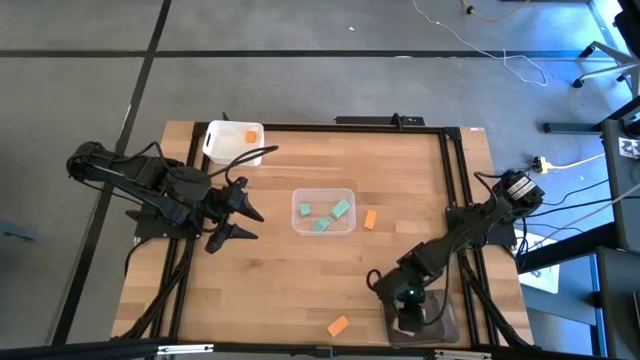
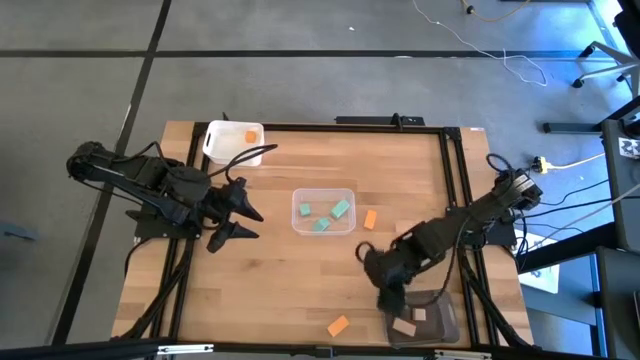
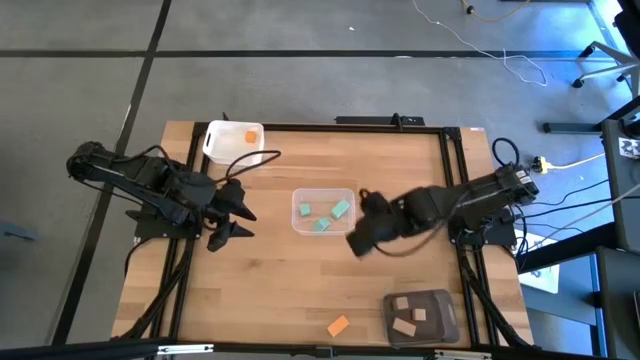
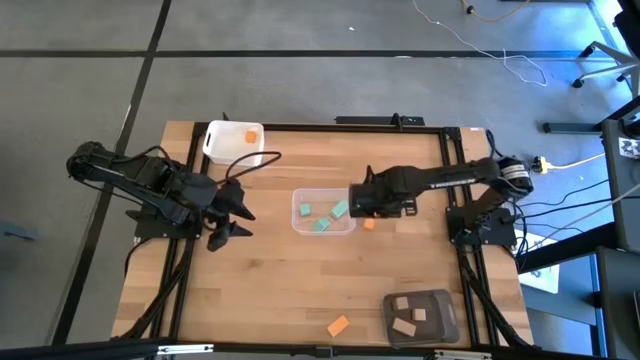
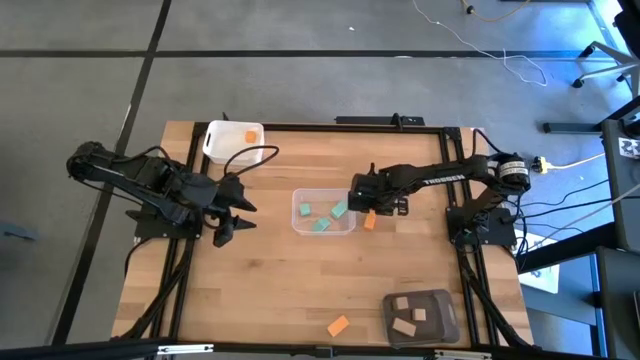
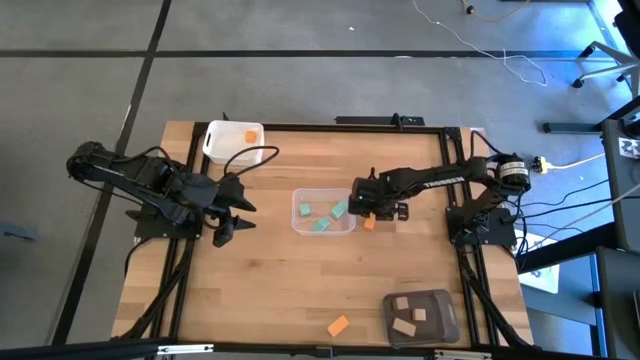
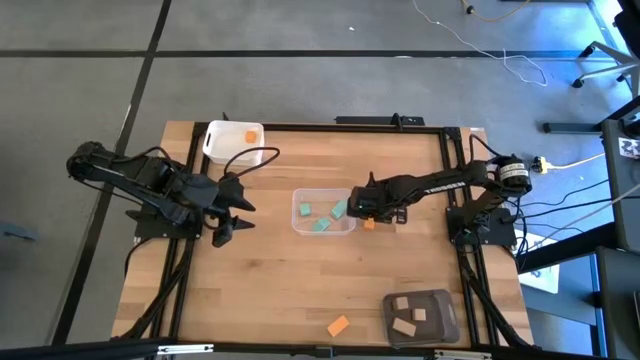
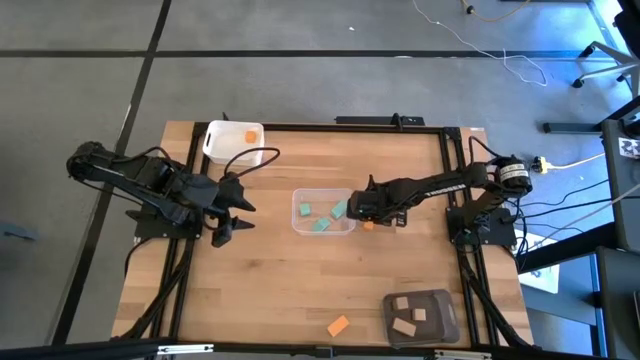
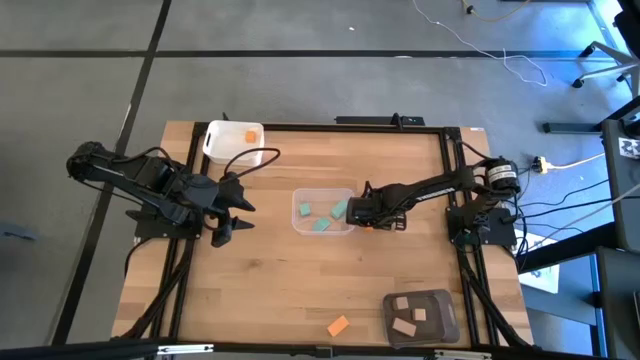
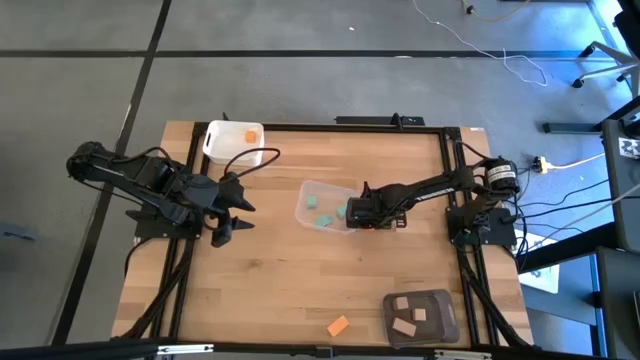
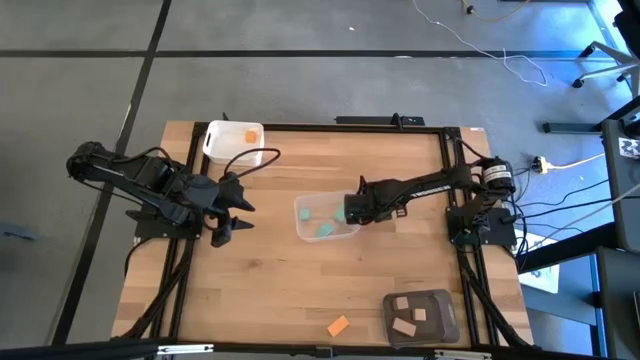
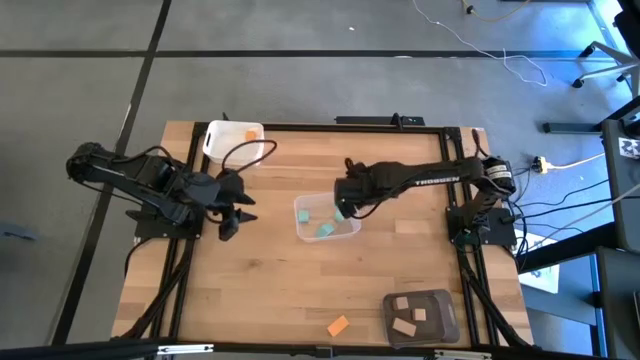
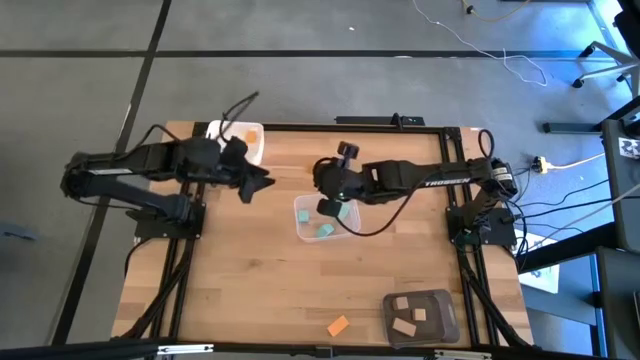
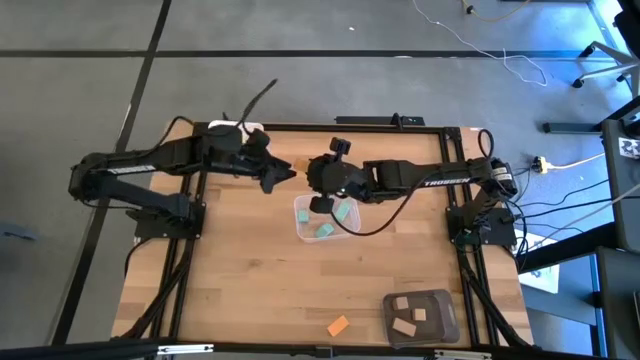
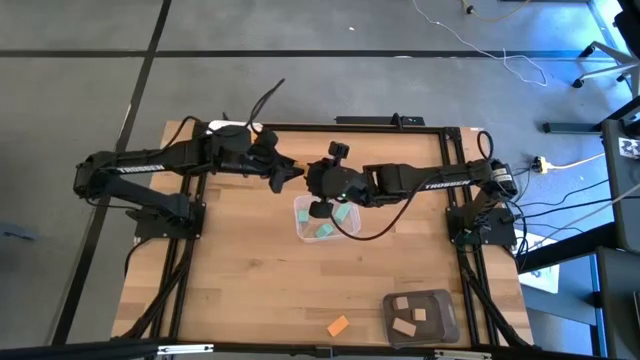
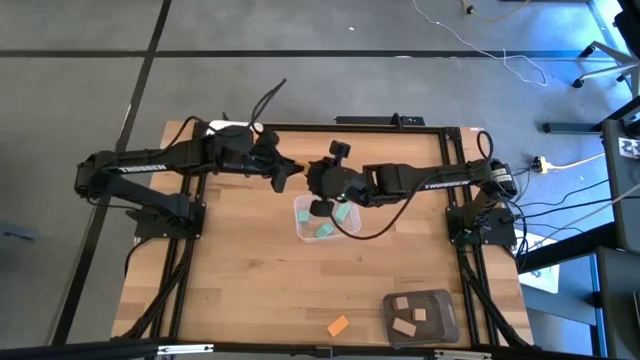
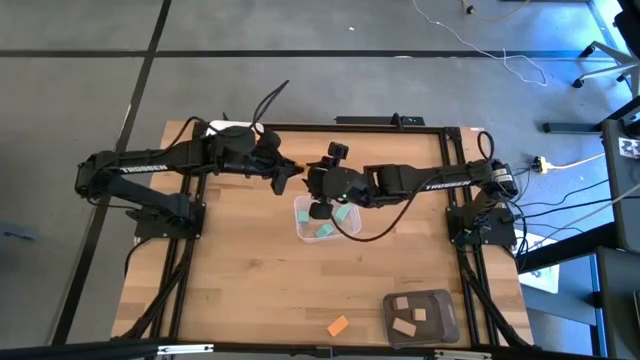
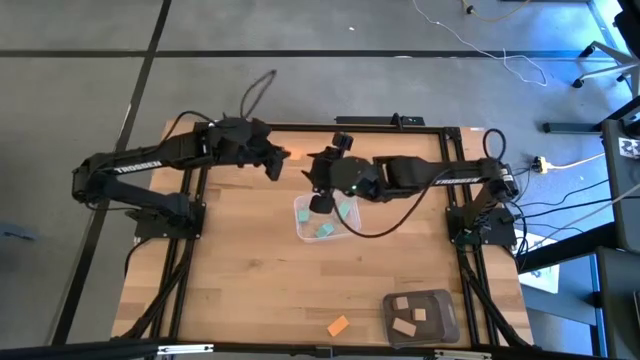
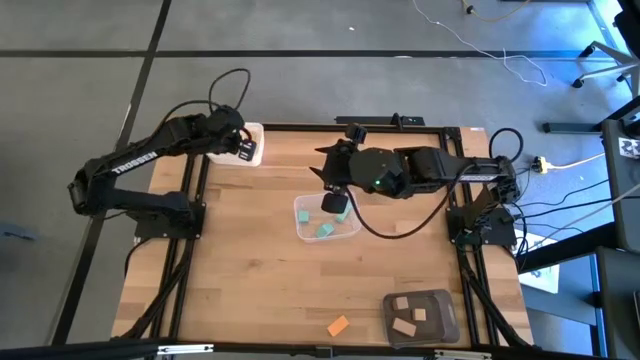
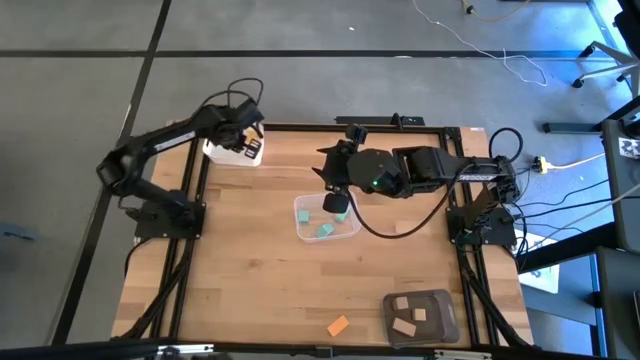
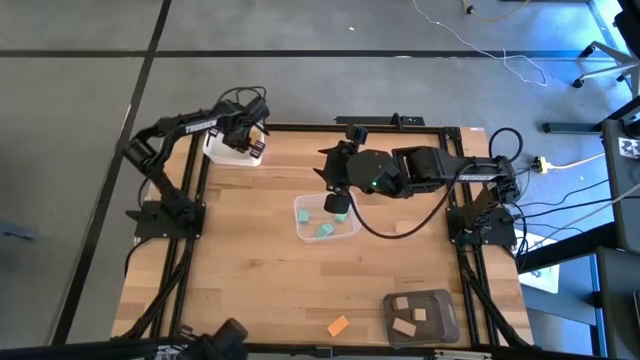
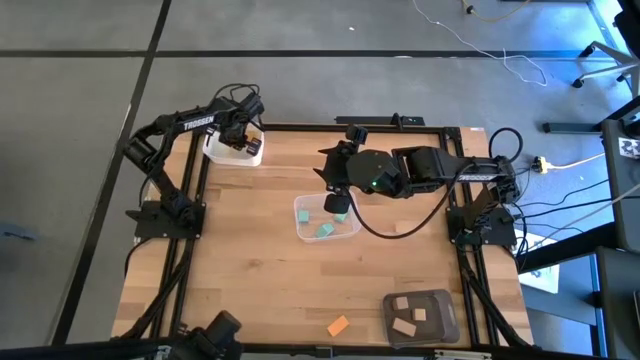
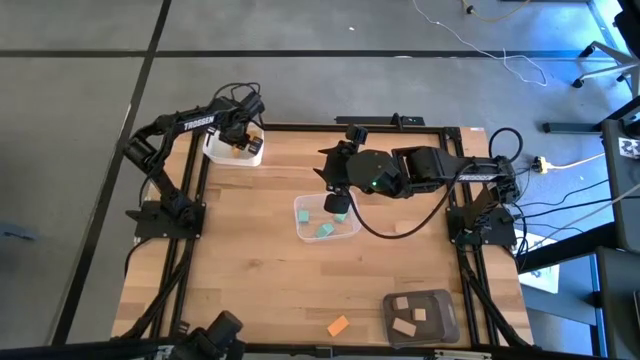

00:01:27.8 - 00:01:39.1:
Task: Sort & place blocks by color
Put the top yellow block into the white bin

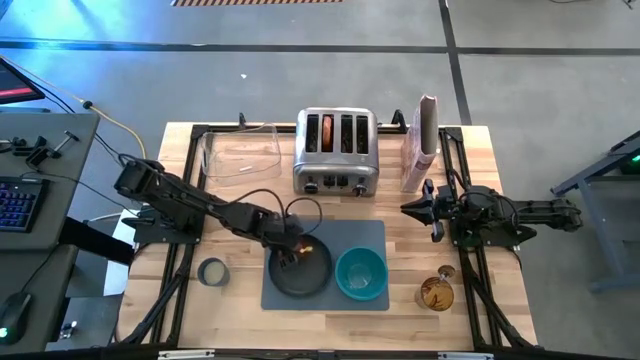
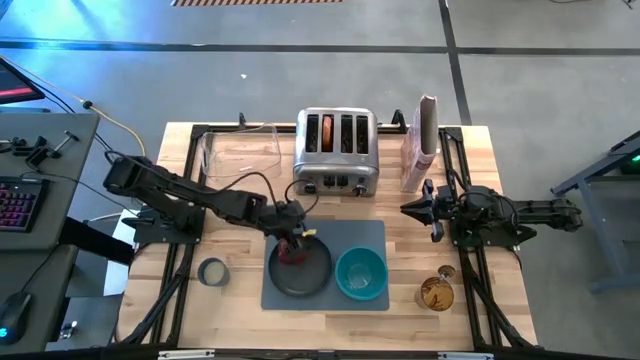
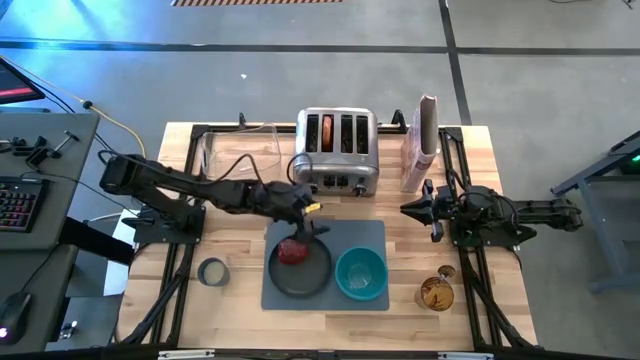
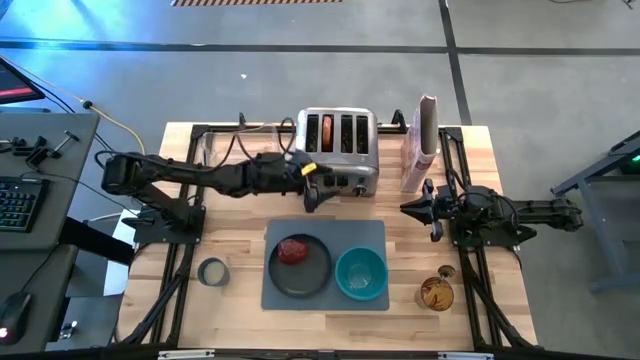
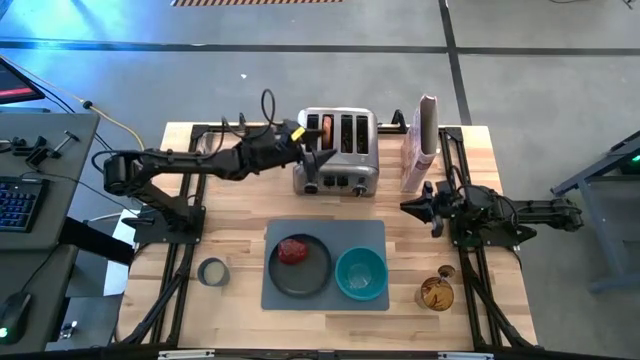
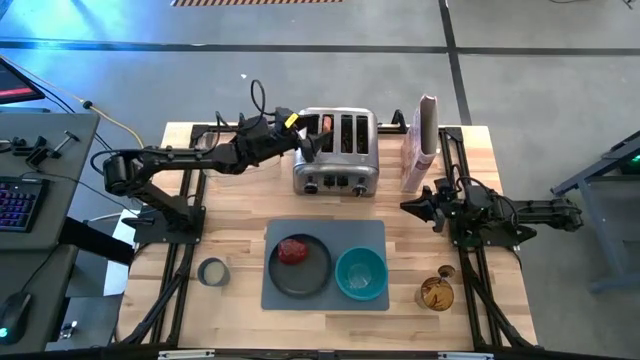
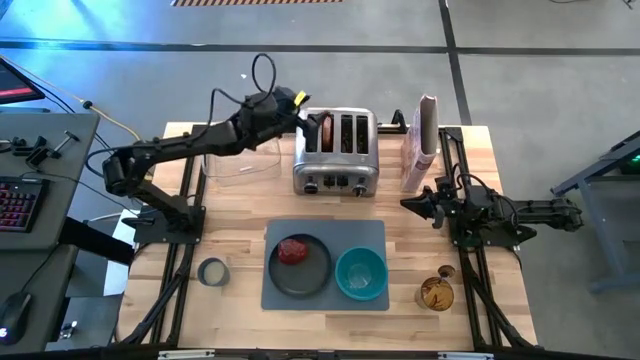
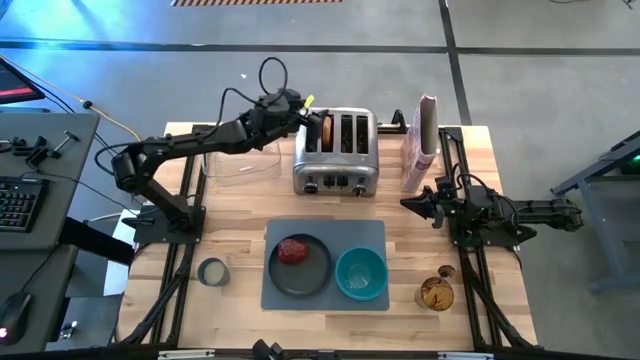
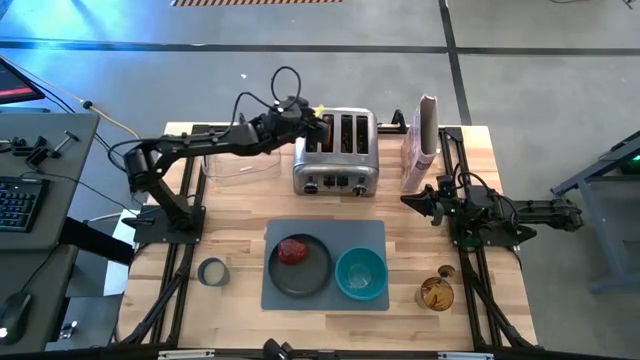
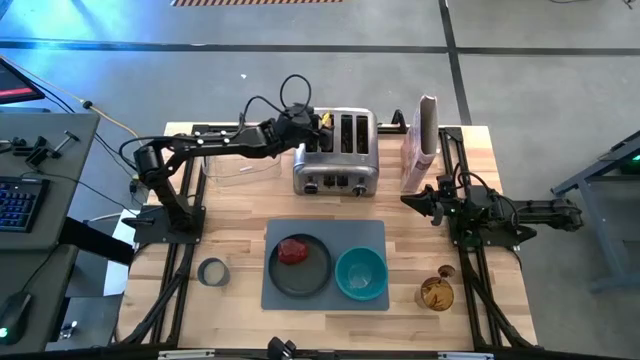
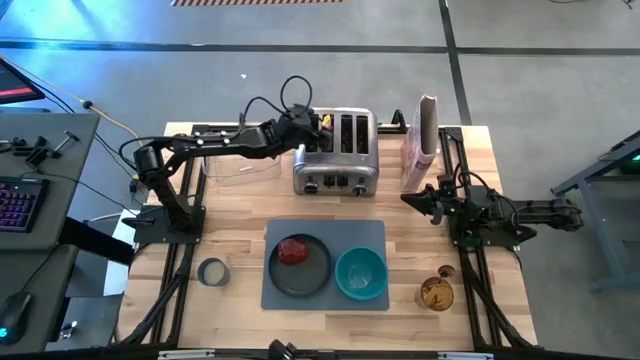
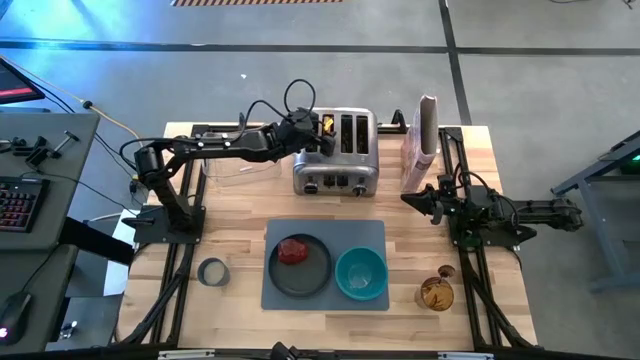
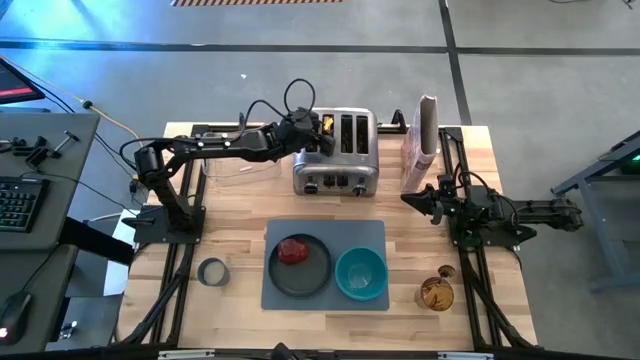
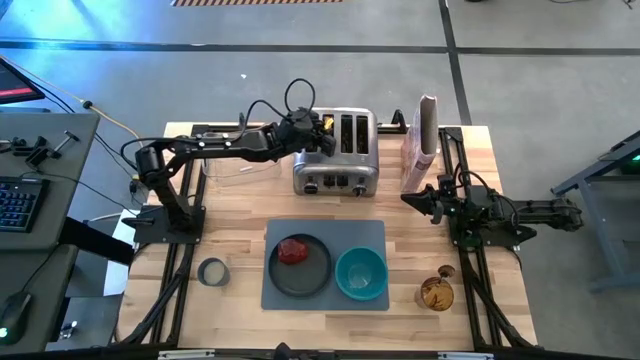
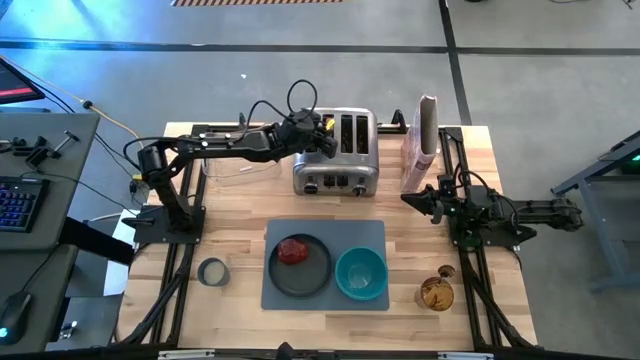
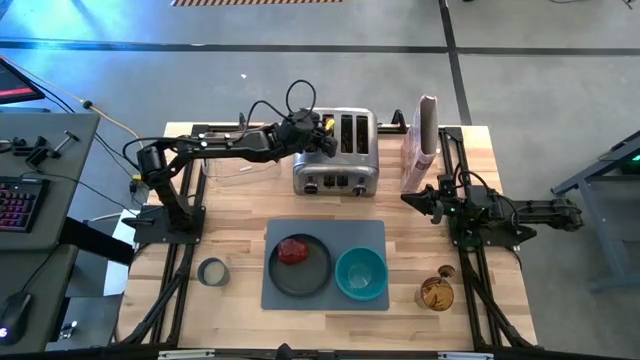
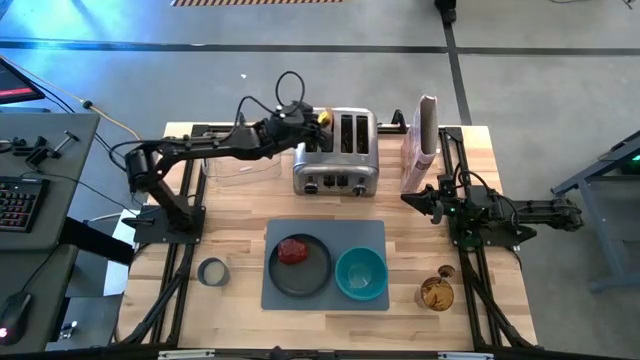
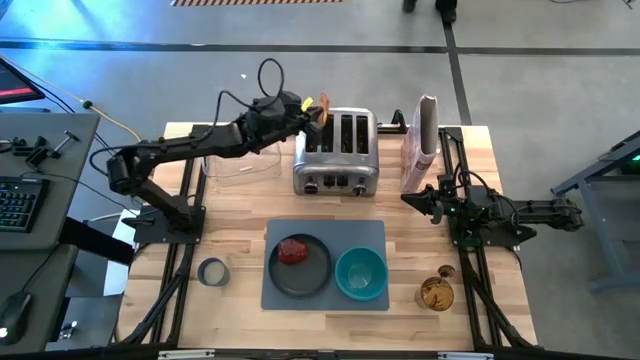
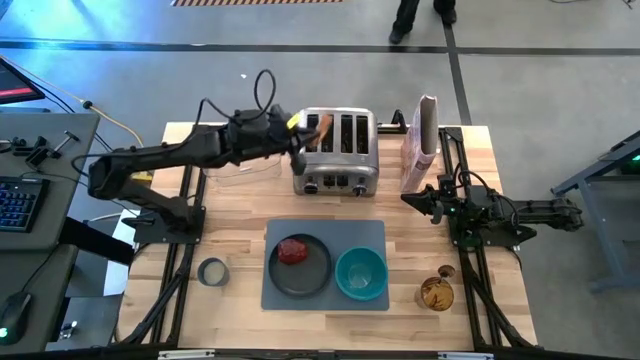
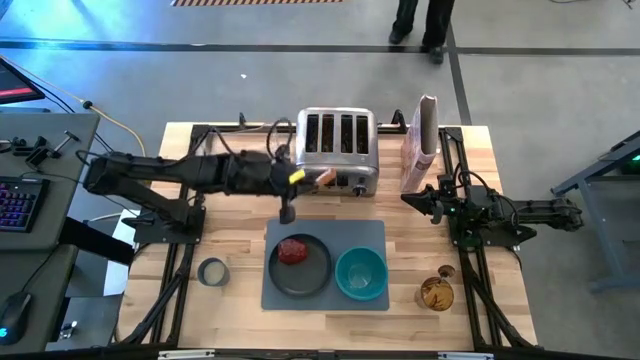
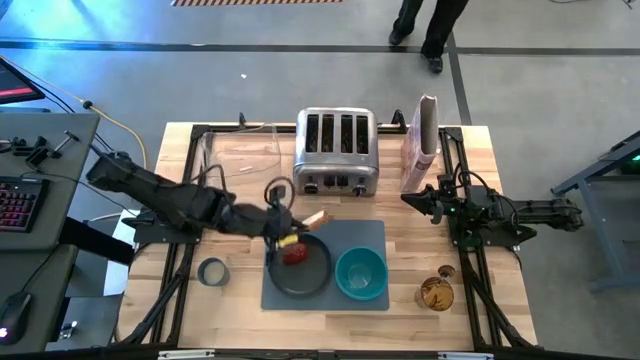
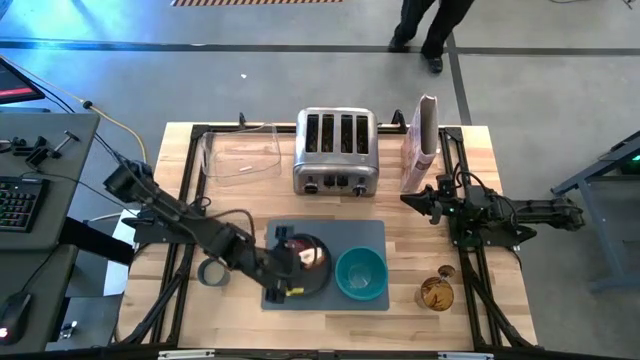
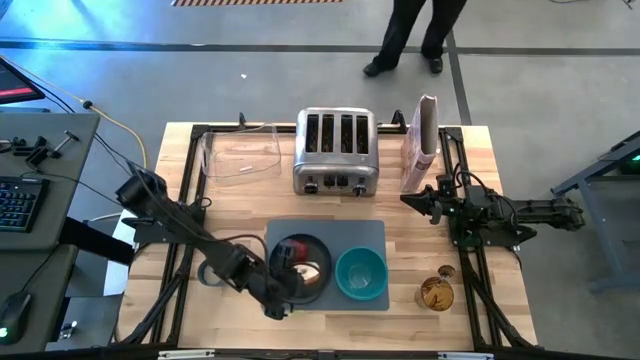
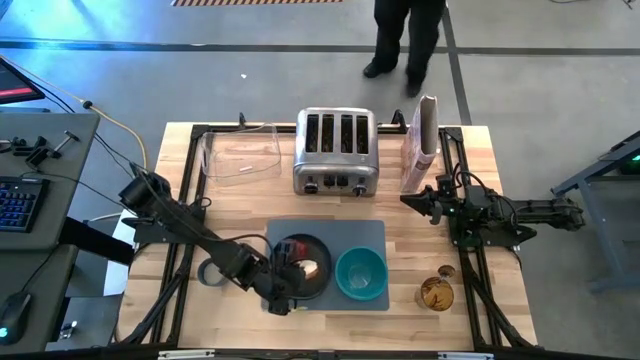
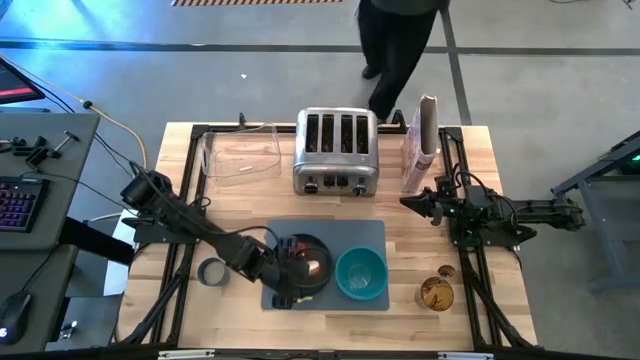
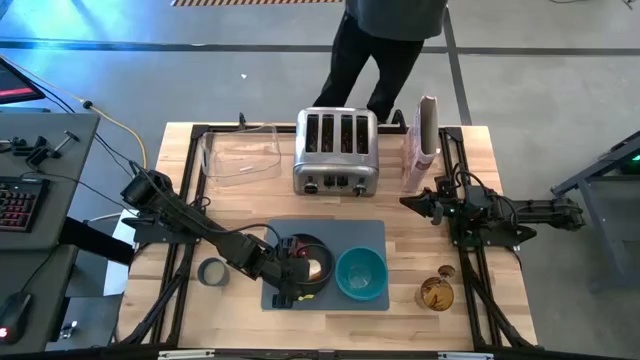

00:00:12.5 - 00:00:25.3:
Task: Arrange a breakfast setting
Put the bread on the black plate
